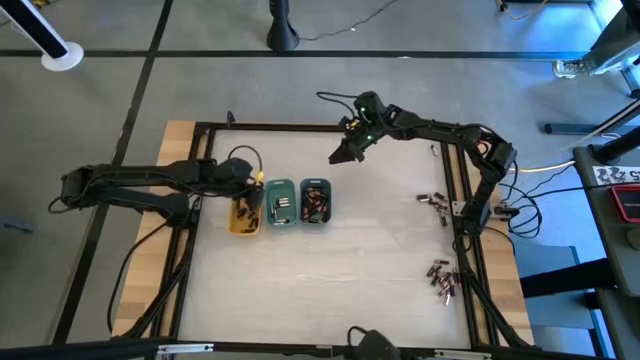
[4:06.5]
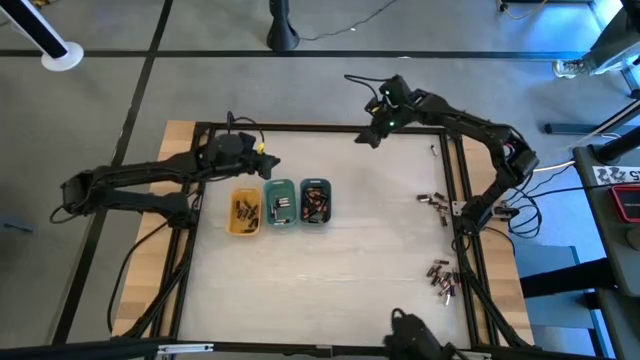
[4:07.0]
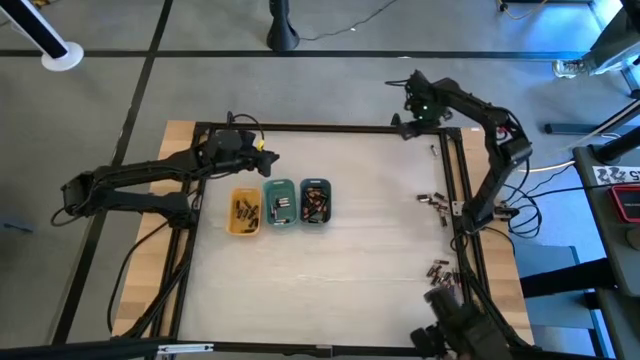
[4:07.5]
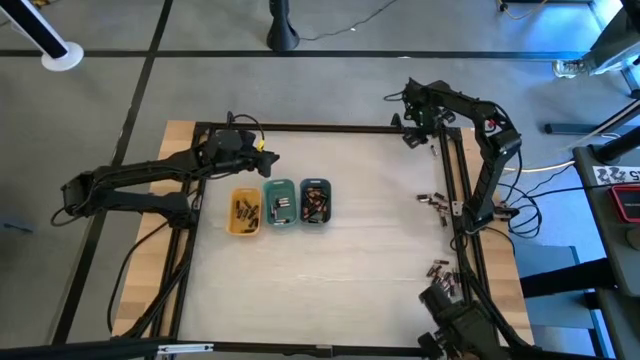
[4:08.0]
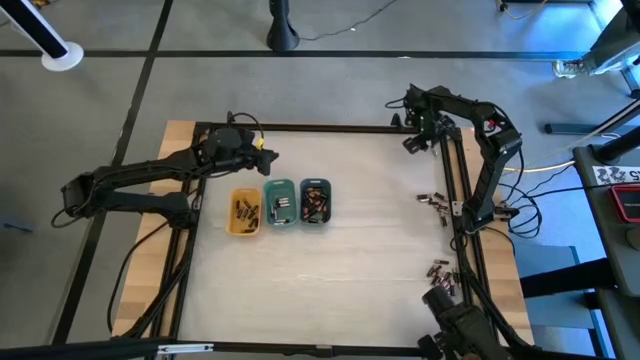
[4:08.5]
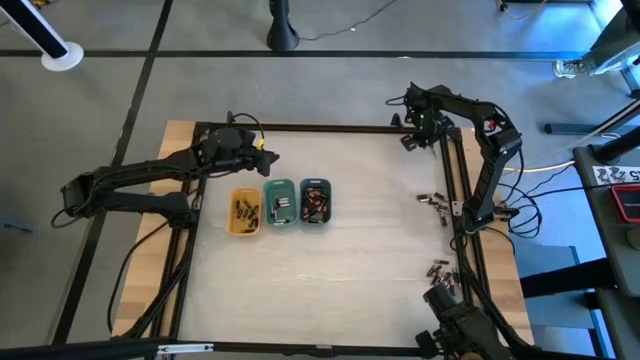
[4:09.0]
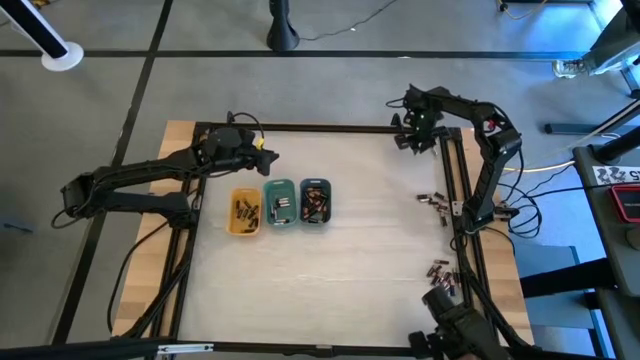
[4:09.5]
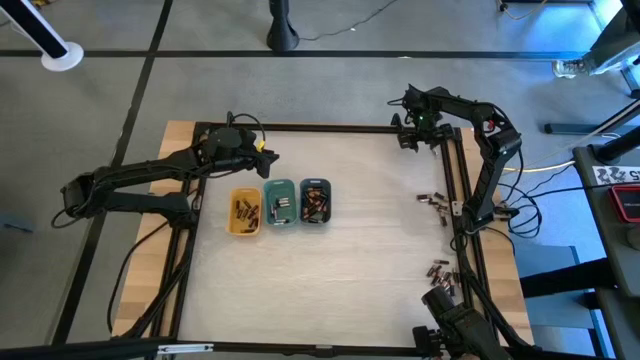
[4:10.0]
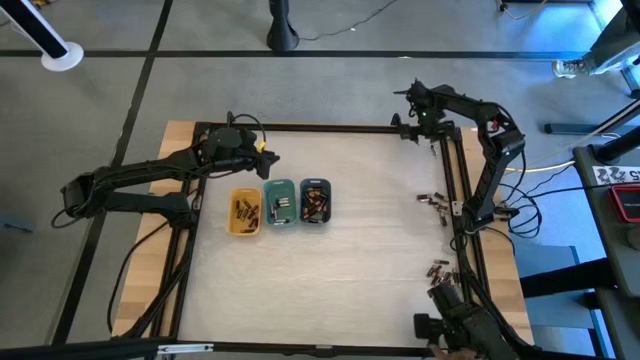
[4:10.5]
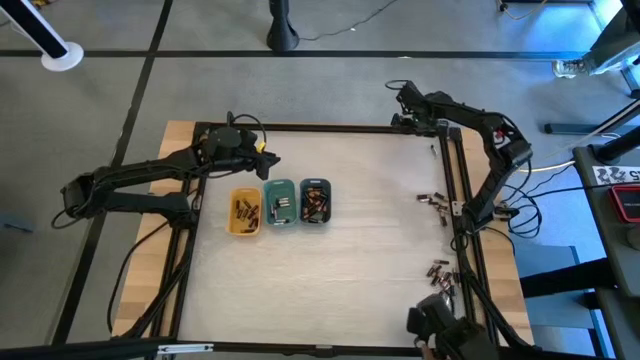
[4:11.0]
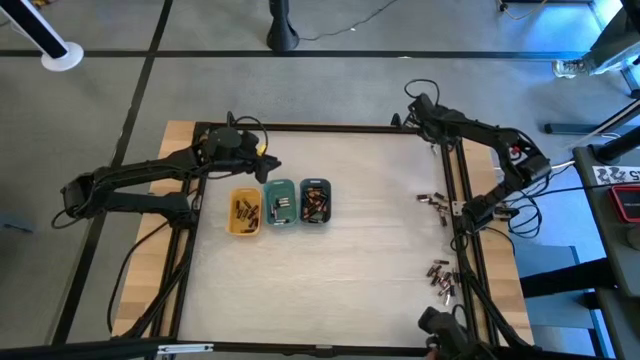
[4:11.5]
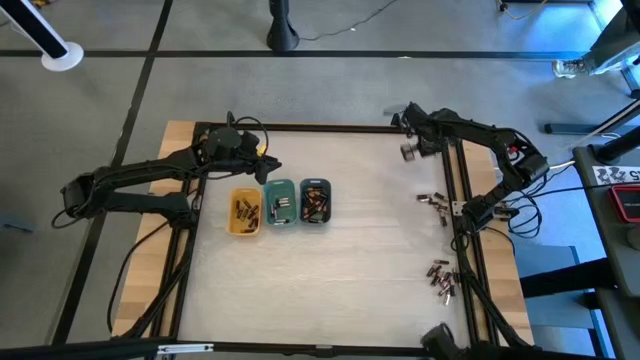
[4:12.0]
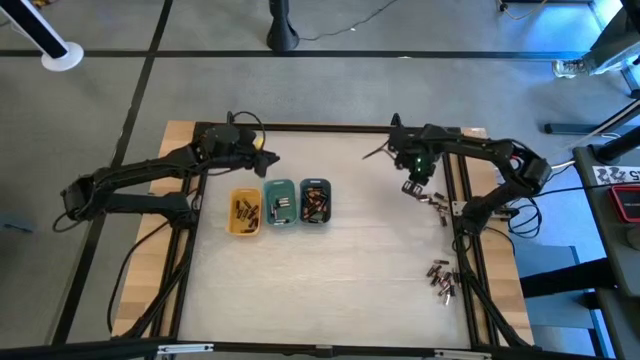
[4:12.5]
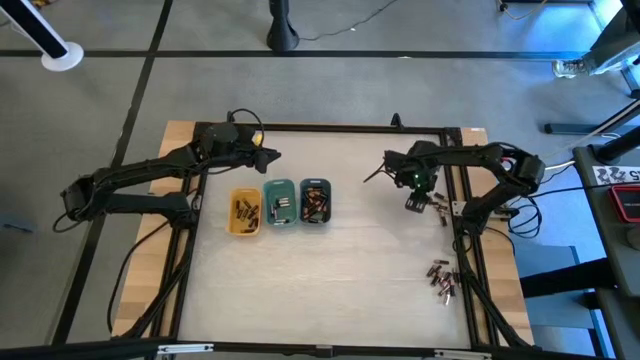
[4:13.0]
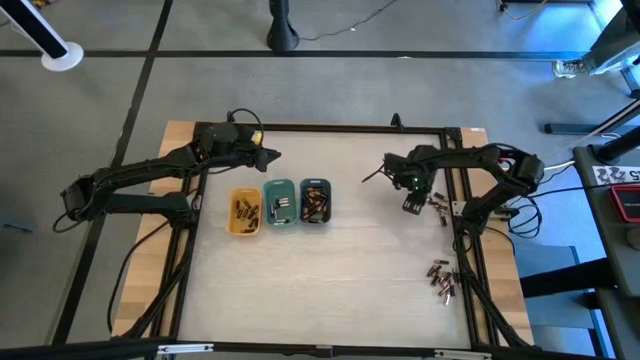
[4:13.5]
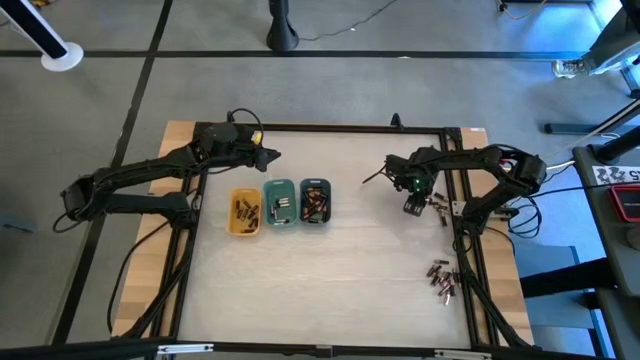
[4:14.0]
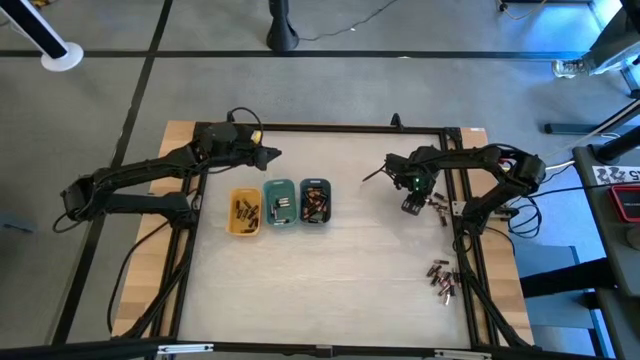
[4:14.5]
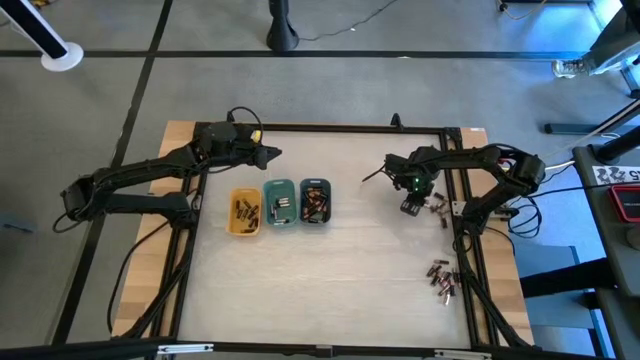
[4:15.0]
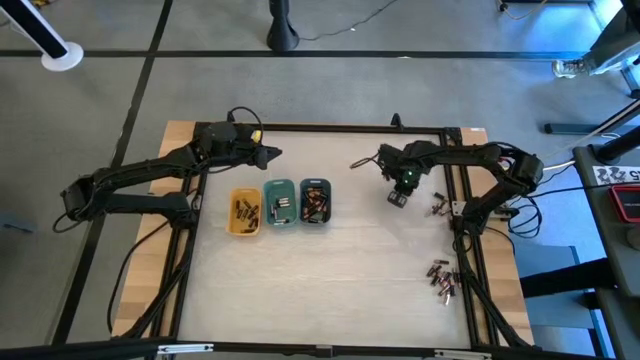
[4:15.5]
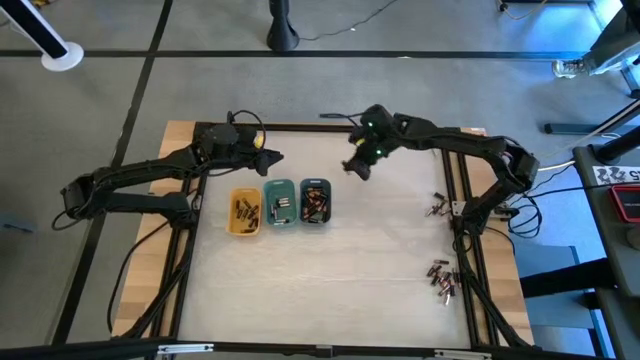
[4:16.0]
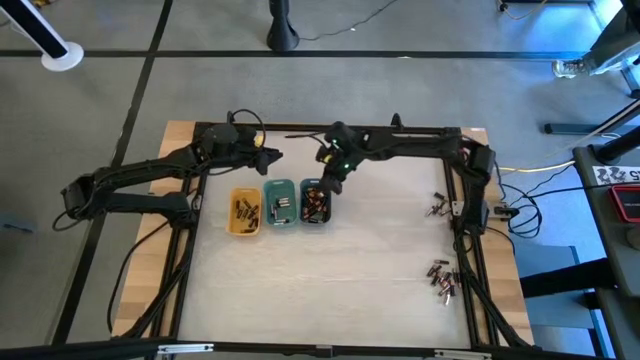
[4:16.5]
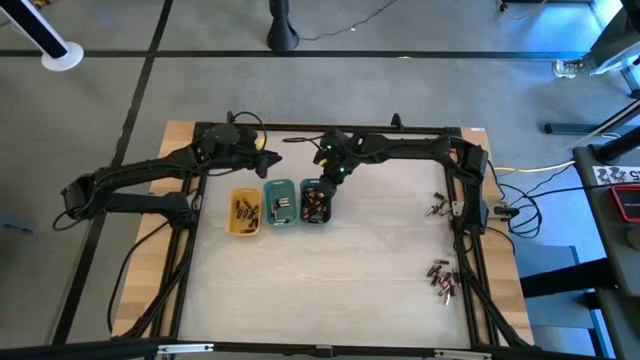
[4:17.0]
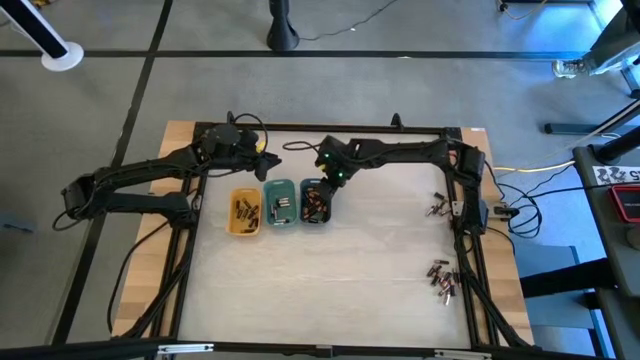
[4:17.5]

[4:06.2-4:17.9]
Task: Sort batteries
Put the large black battery into the blue bin

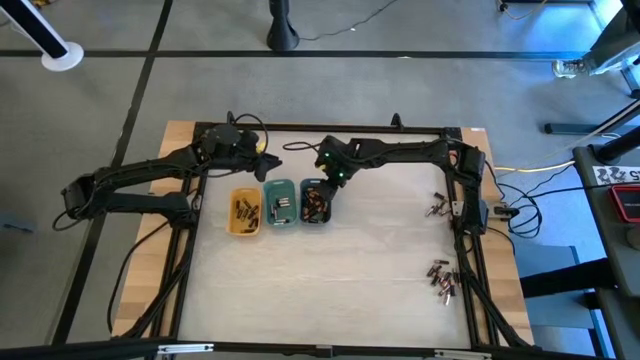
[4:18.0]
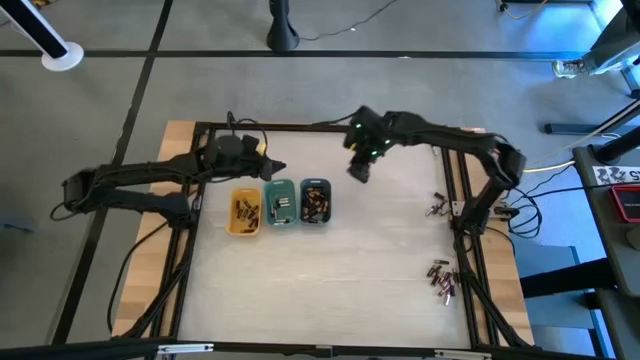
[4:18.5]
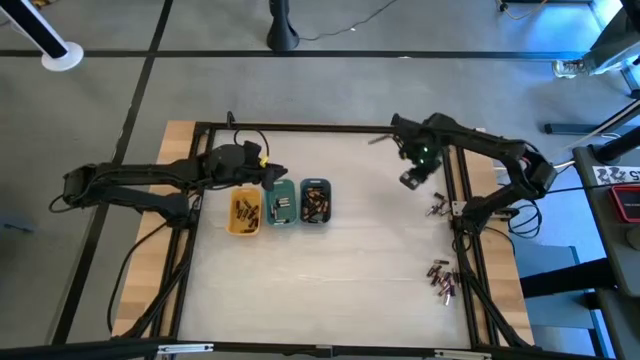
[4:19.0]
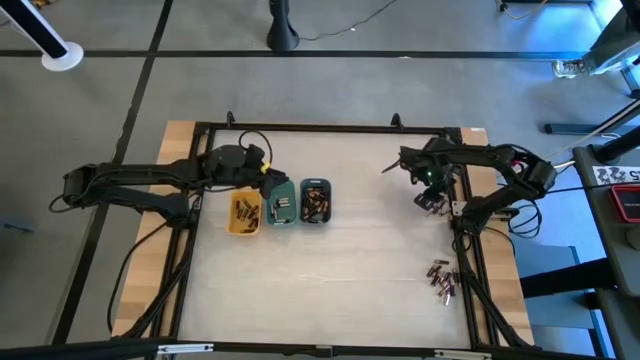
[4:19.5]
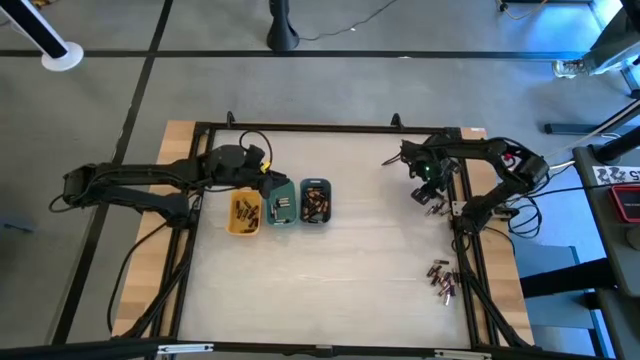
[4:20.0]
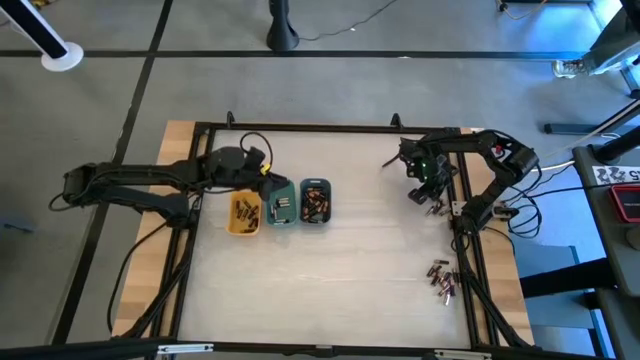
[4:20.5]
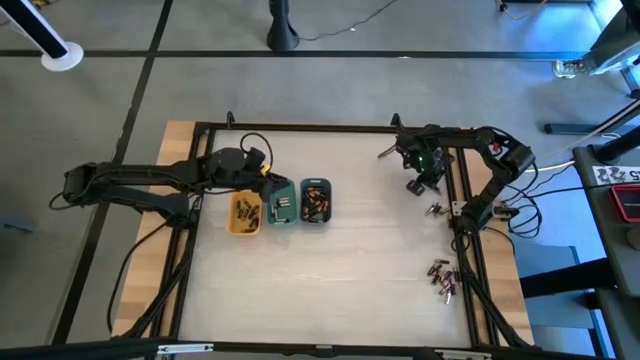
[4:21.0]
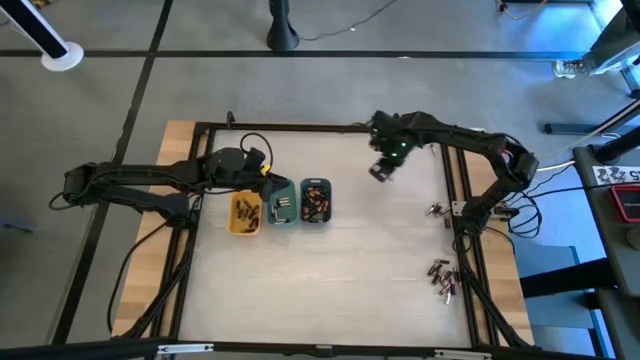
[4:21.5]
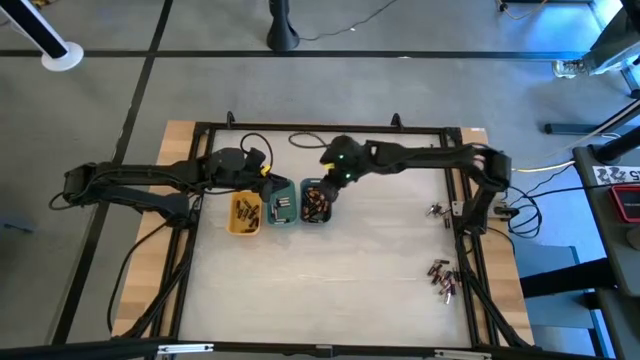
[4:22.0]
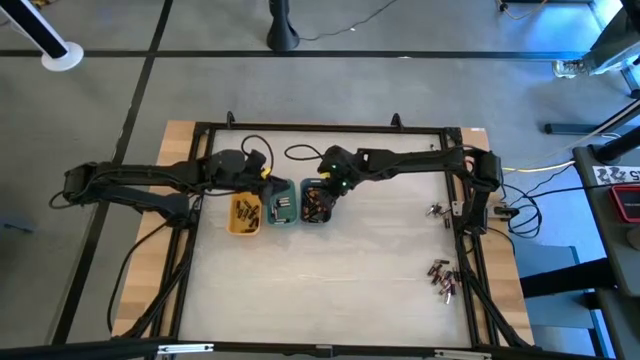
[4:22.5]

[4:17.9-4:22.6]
Put the large black battery into the blue bin

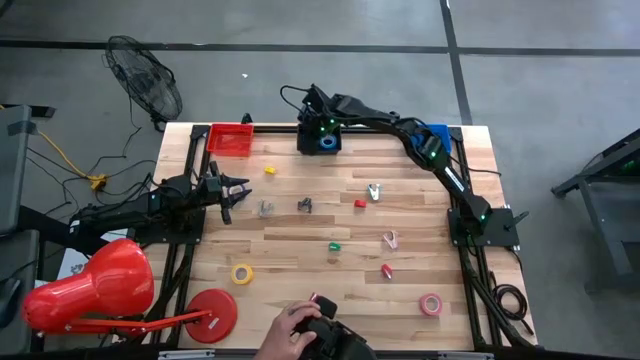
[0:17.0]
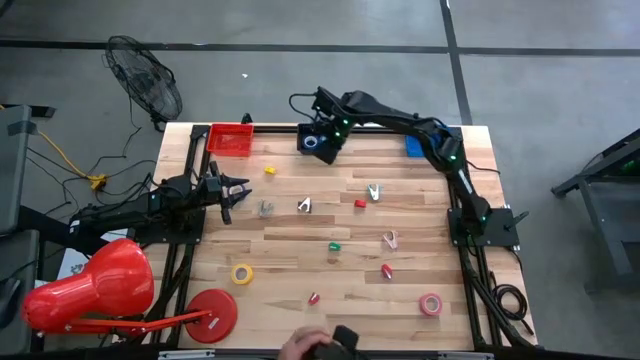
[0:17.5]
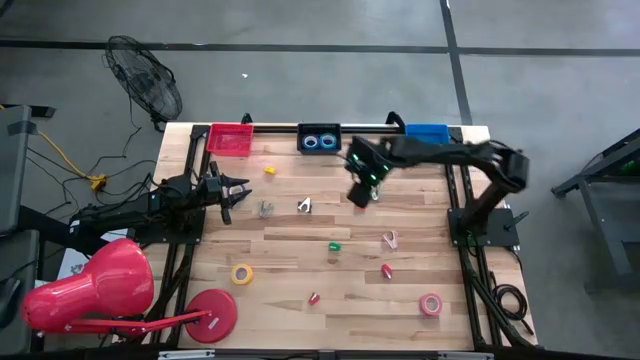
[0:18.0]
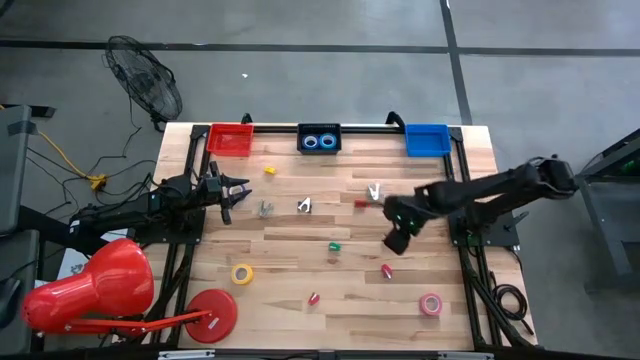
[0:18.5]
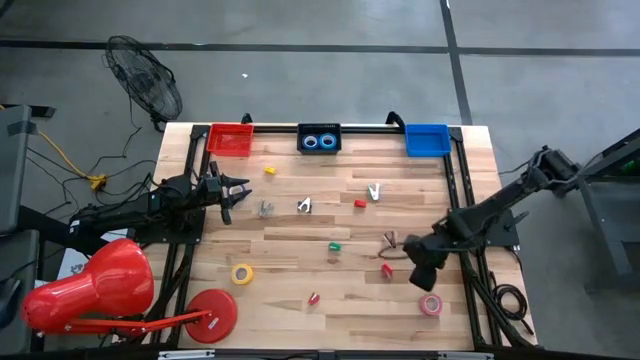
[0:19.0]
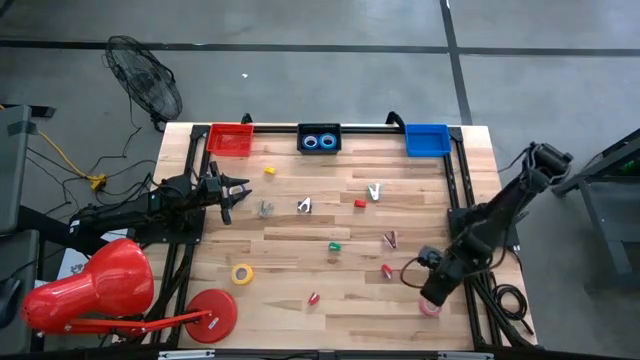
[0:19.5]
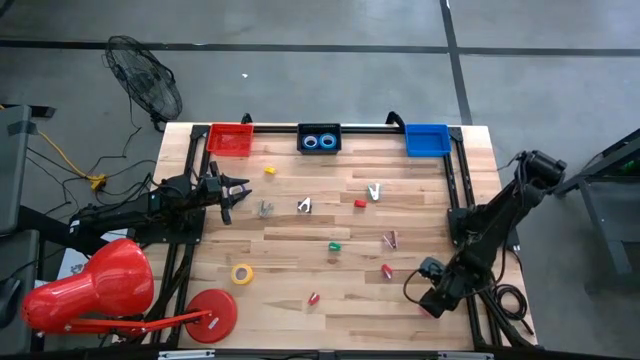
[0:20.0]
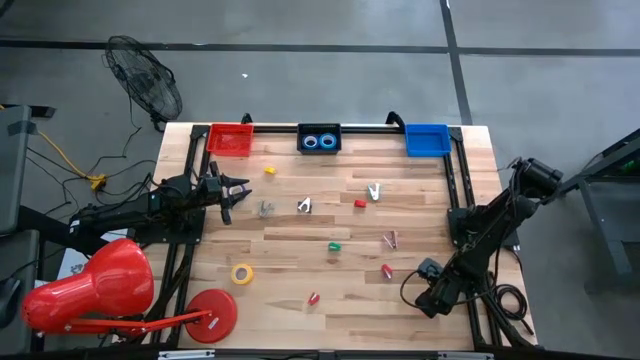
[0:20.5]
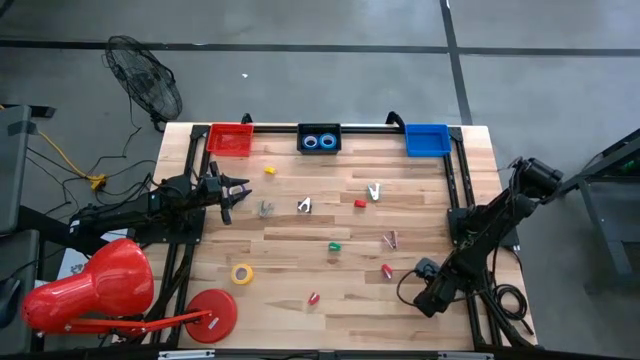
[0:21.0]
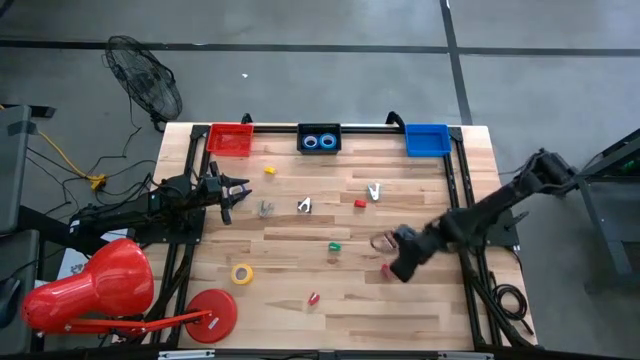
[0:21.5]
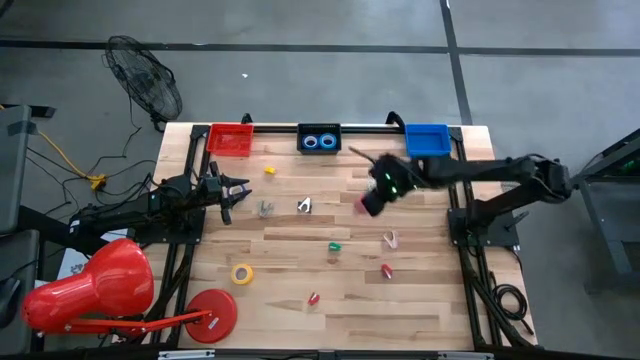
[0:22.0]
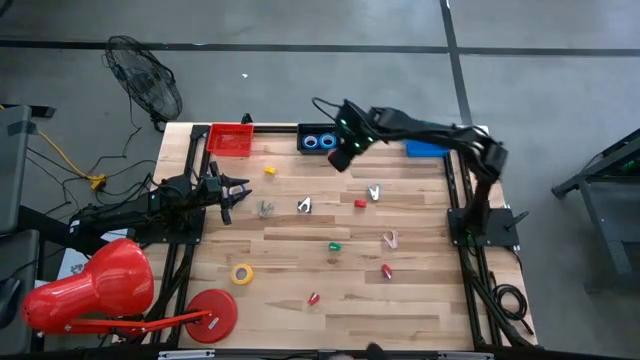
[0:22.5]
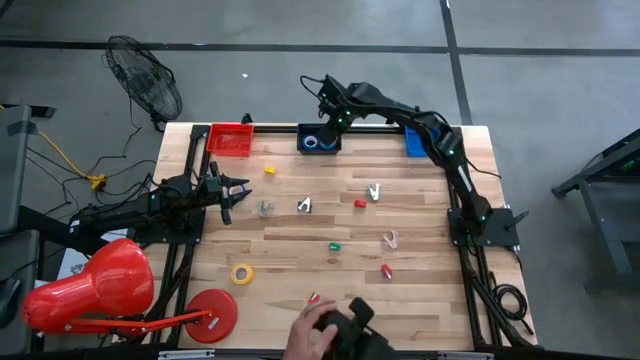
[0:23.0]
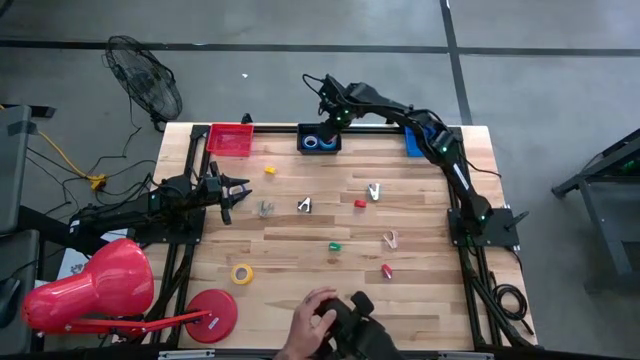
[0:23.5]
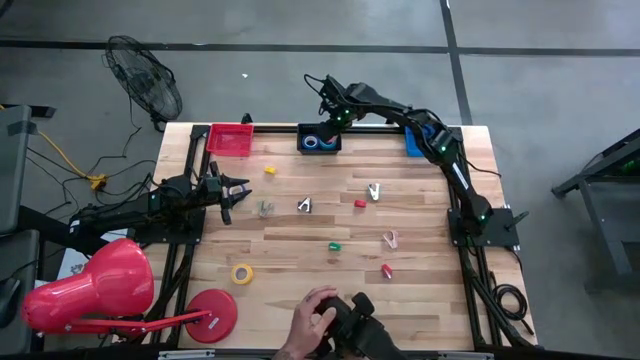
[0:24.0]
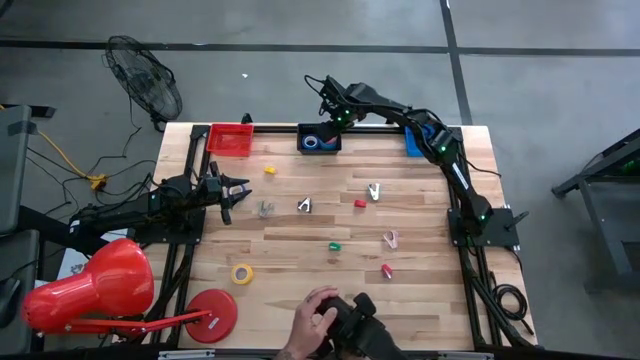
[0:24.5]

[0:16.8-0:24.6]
Task: Pick and place Stapler, Stapler remover, tape
Put the pink tape into the black bin
